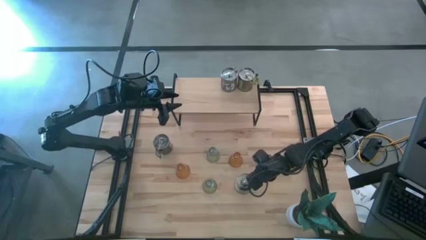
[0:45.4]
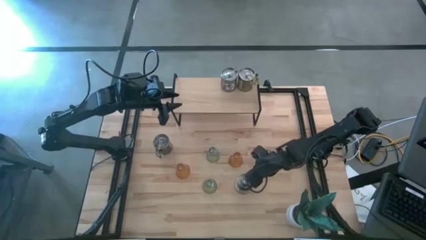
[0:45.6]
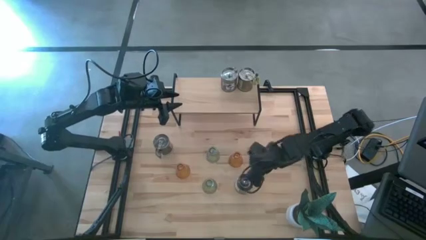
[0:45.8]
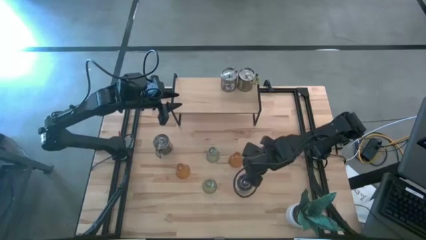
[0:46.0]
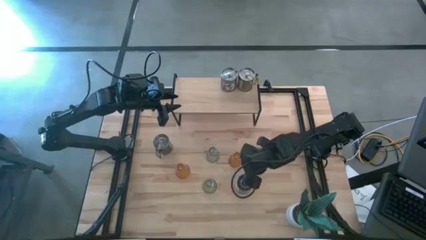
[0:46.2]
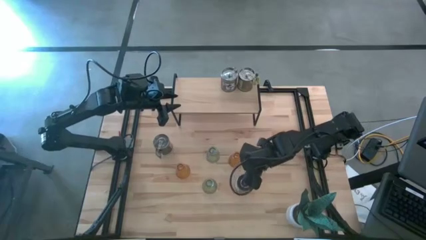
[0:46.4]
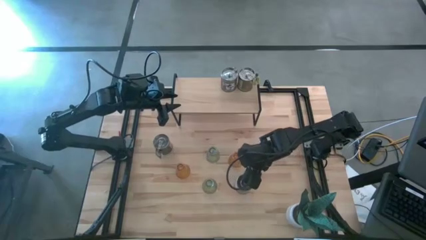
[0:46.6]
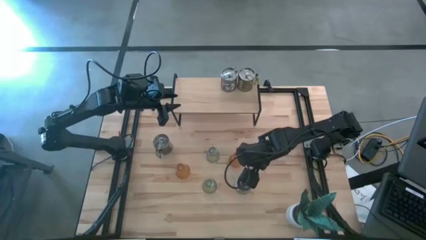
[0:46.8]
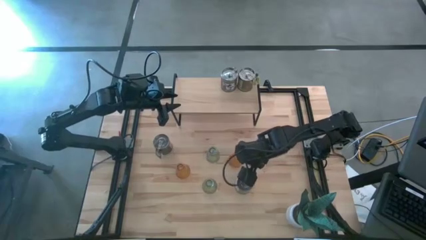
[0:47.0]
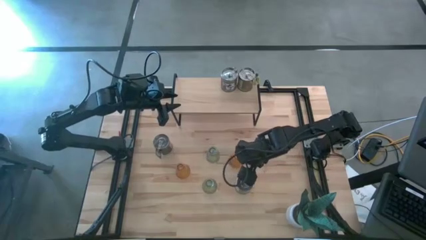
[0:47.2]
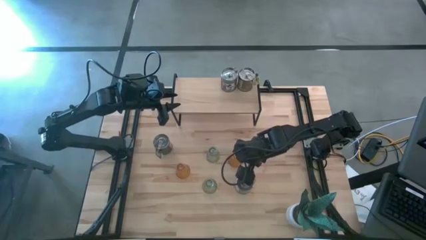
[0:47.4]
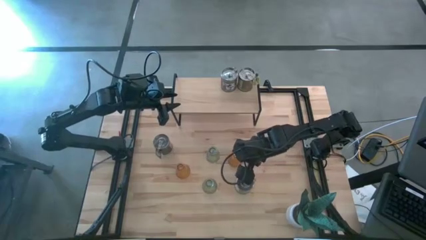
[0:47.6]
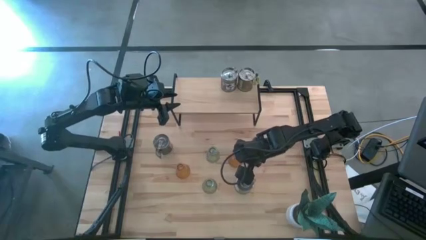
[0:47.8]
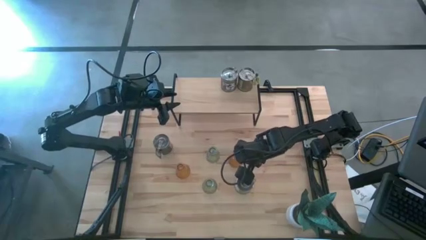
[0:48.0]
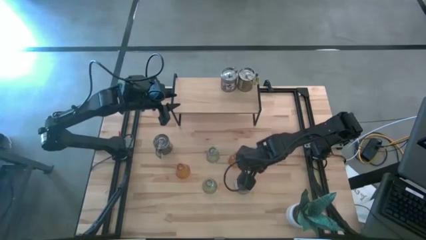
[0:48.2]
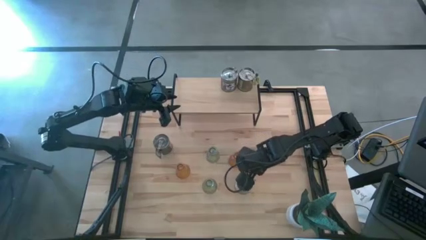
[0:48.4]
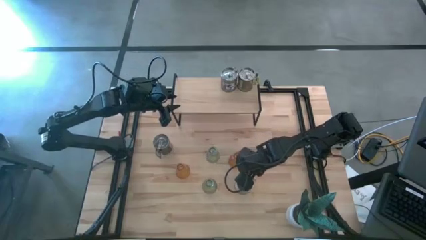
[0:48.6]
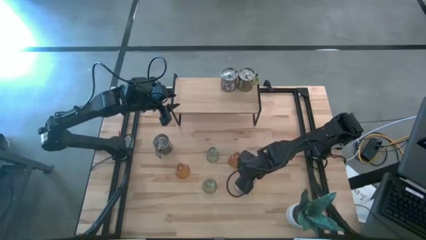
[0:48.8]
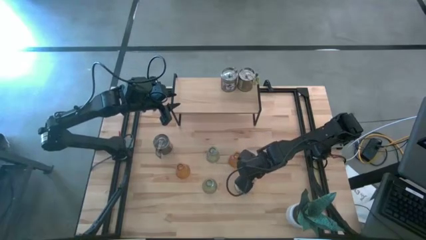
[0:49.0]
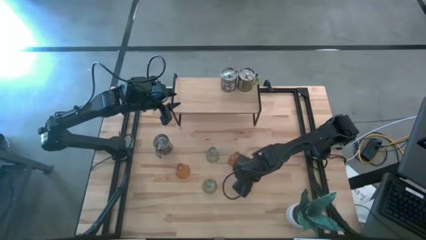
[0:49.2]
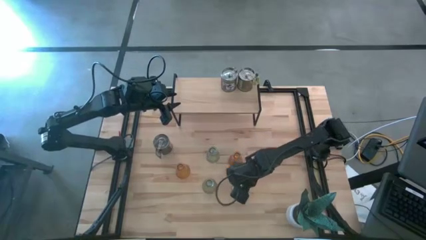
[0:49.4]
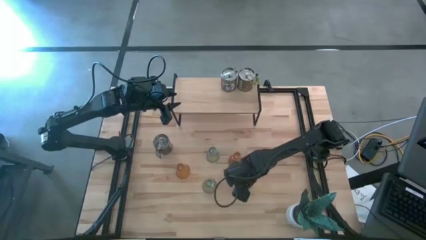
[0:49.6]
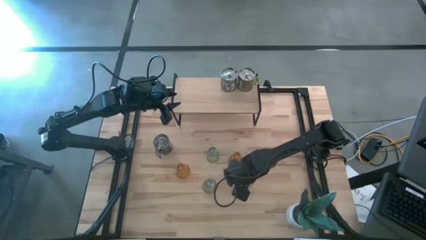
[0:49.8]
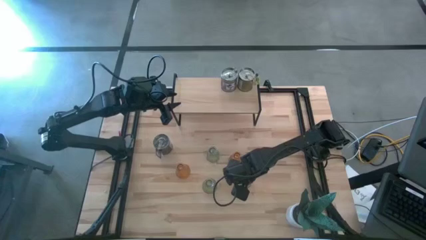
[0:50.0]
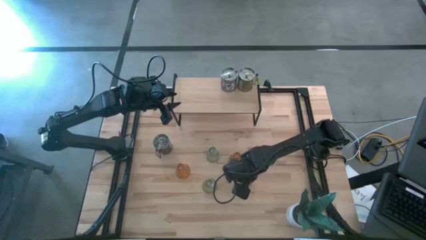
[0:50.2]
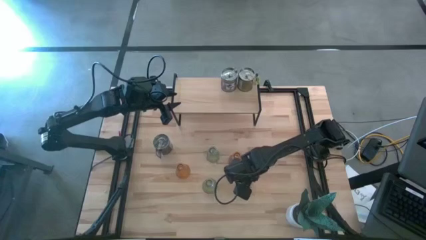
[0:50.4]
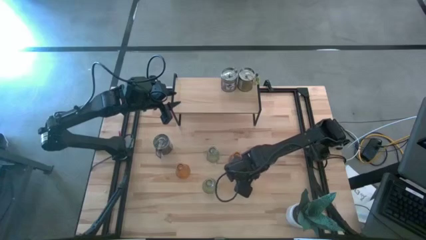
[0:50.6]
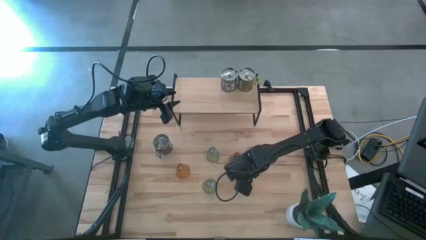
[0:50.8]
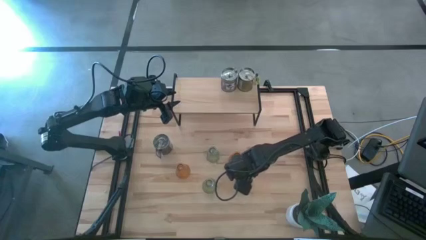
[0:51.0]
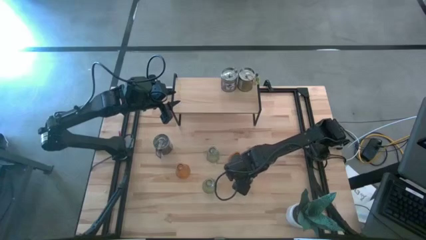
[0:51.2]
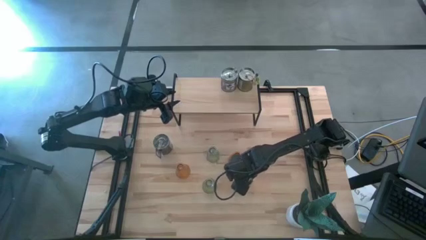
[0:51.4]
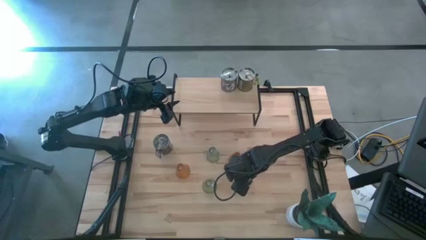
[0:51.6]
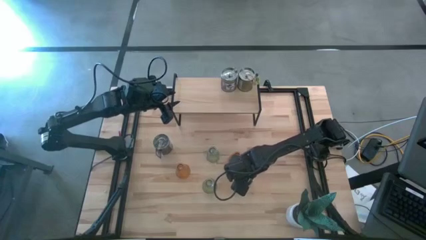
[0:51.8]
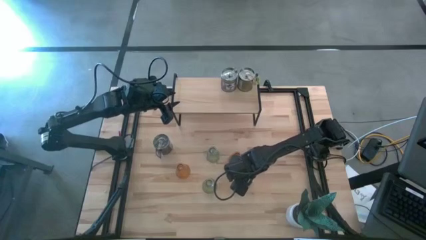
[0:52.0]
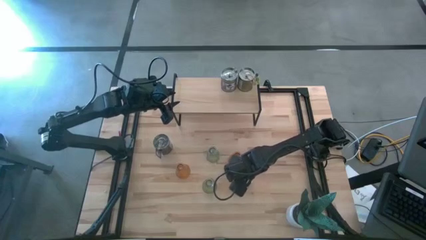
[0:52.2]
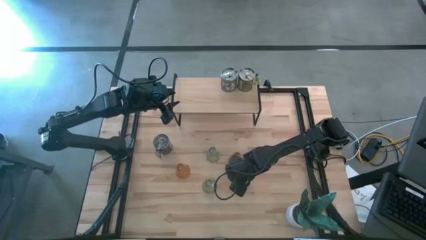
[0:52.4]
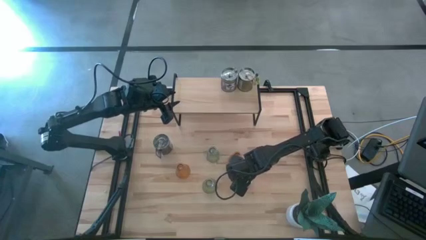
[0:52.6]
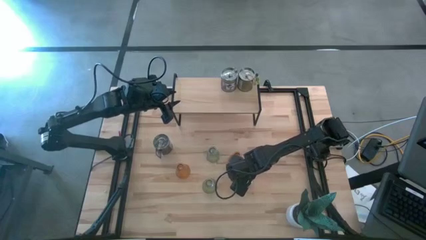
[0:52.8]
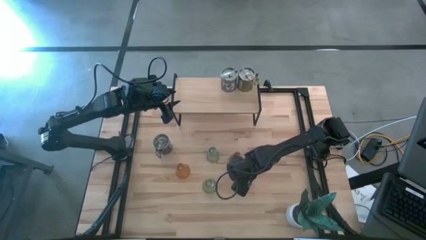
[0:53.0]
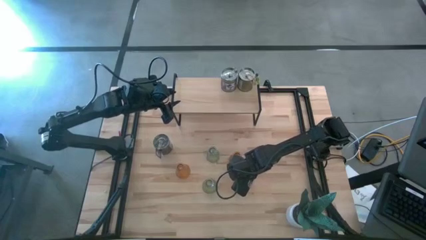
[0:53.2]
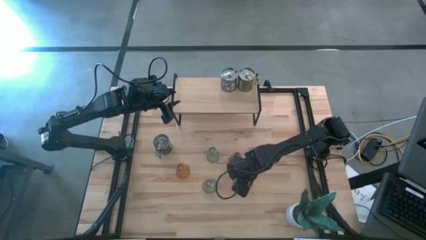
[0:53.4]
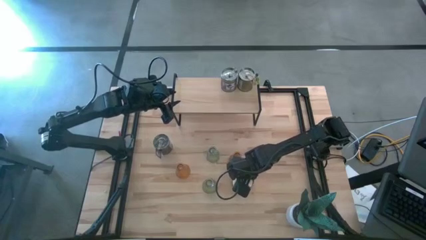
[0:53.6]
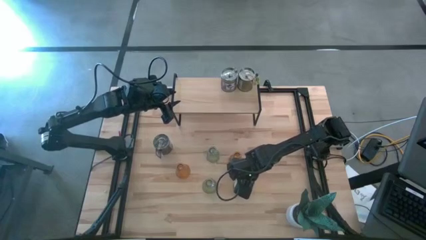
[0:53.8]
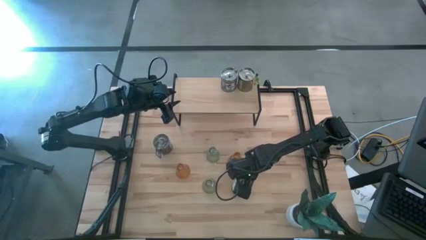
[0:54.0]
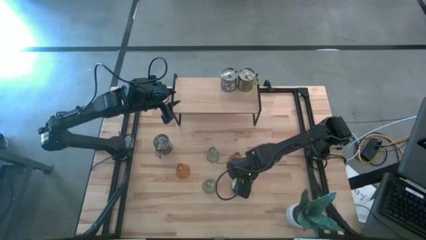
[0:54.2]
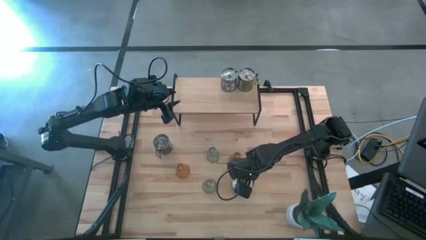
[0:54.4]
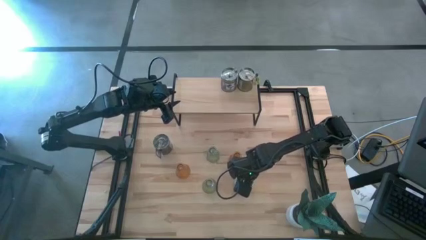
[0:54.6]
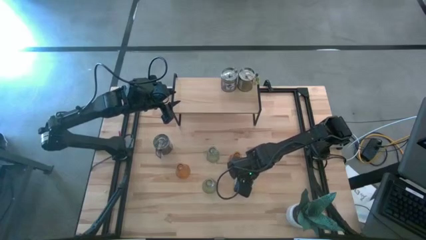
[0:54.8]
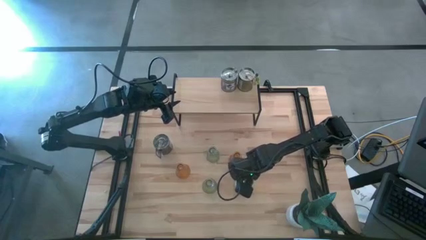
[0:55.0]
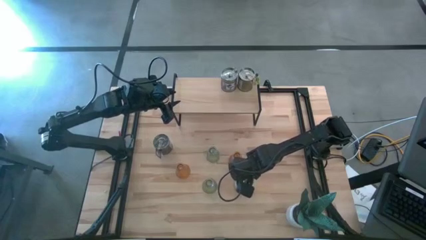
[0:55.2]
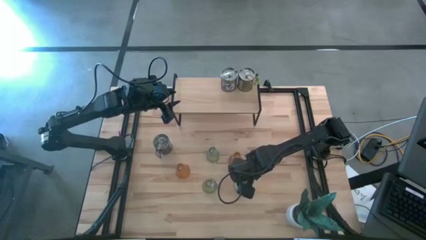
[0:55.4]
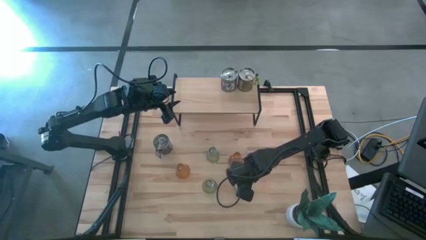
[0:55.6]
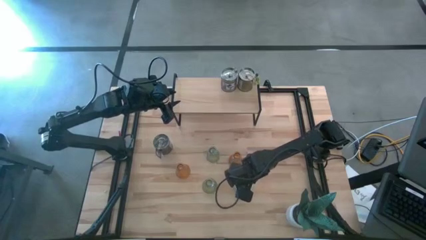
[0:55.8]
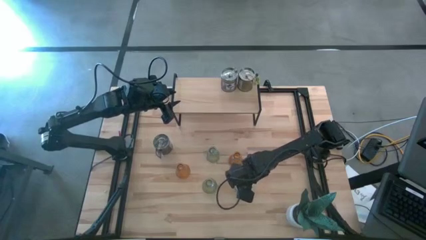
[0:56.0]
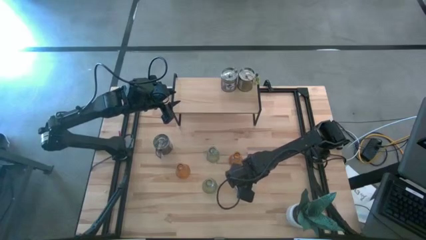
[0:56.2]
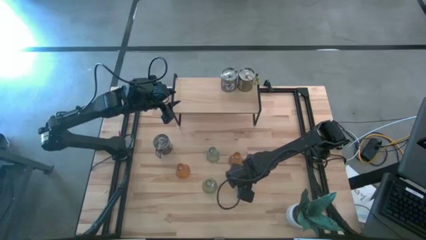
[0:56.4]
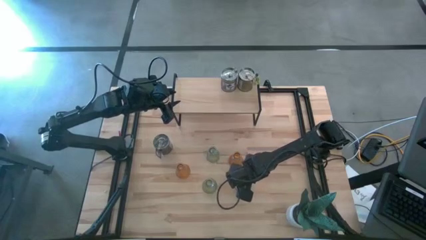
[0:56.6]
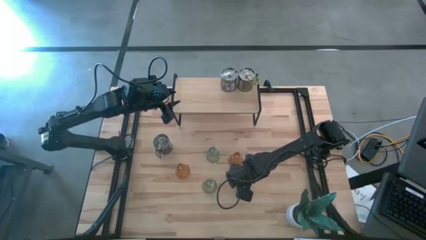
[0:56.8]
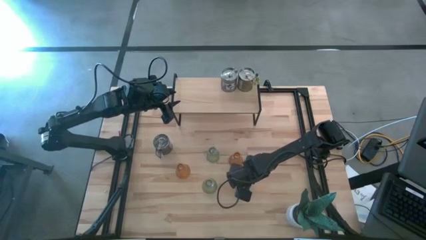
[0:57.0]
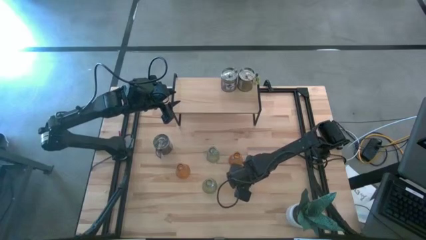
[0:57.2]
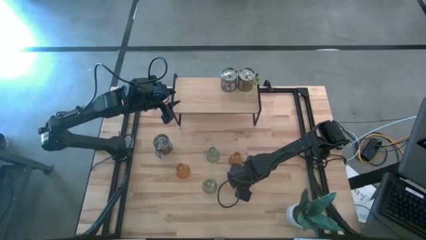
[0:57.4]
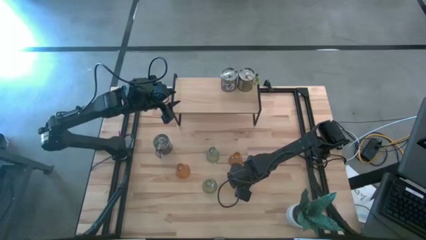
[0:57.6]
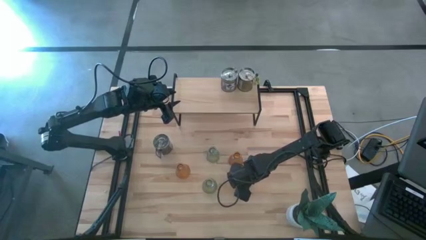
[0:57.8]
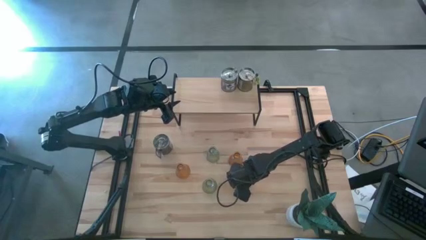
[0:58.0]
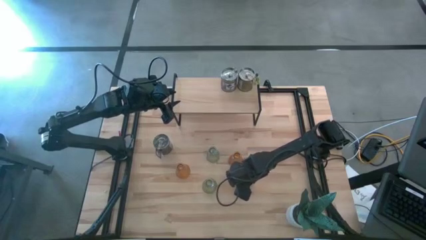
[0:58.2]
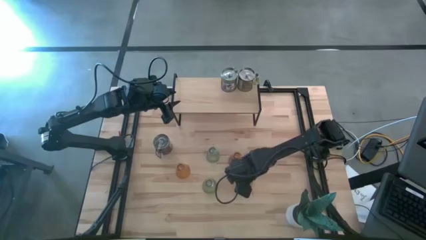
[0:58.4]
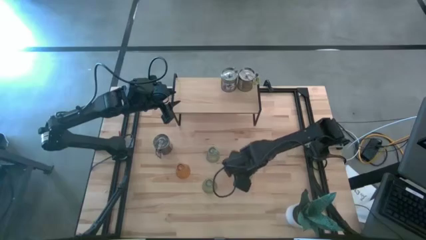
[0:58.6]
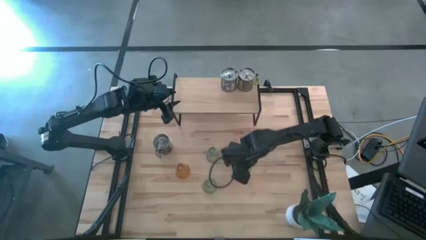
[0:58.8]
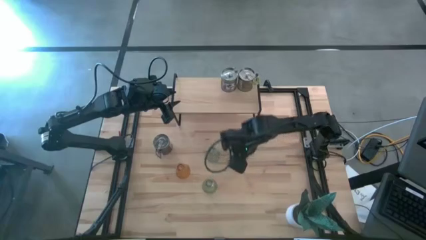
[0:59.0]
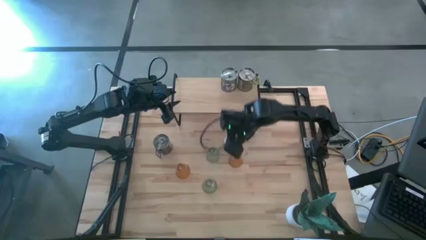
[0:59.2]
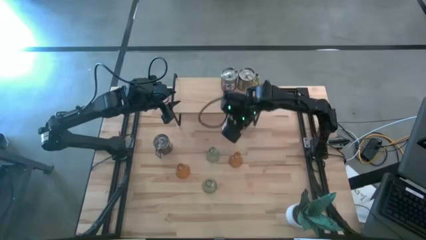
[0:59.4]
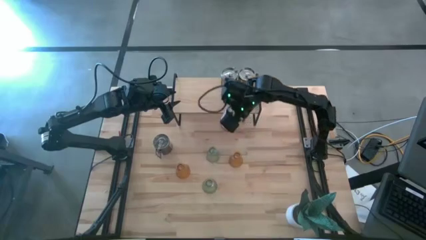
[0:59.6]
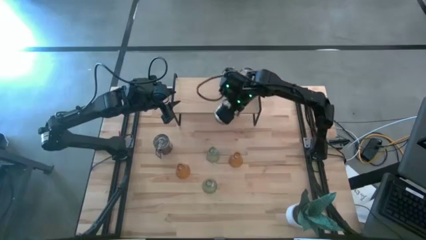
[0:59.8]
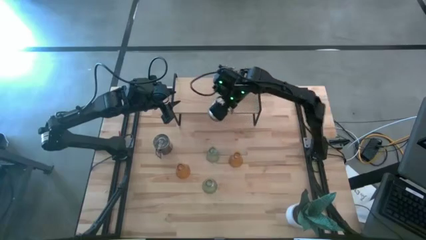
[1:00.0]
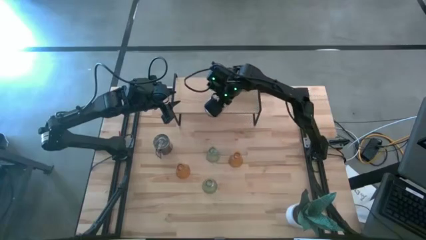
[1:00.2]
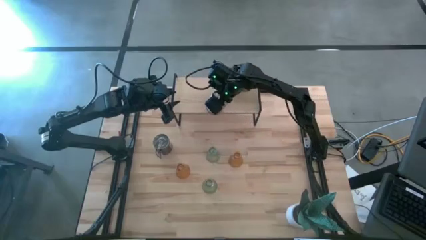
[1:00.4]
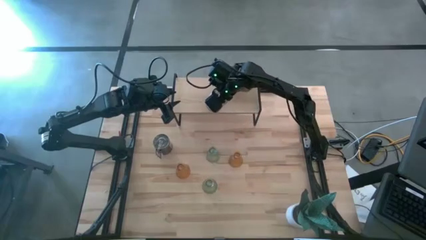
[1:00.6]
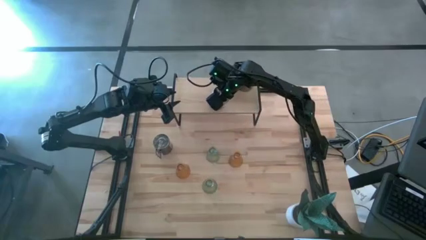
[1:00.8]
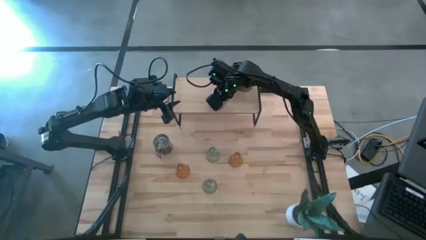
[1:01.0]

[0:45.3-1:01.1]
Task: Pick & Place candle stick holders
Put the silver scented candle on the shelf
